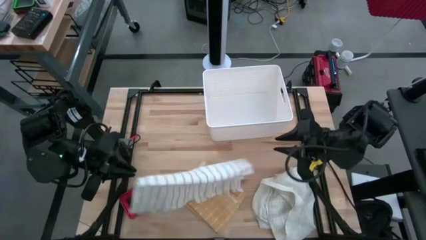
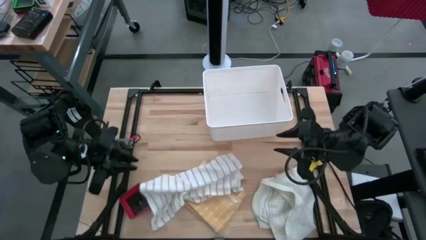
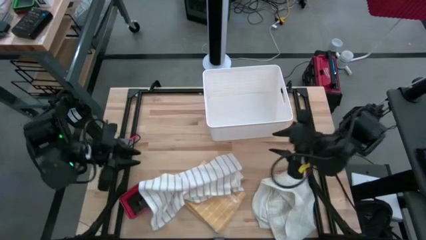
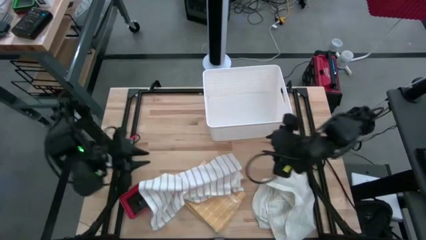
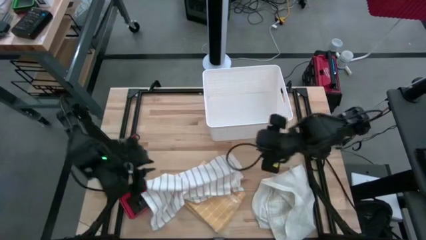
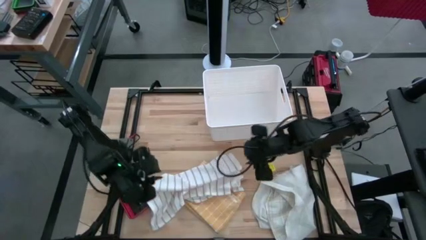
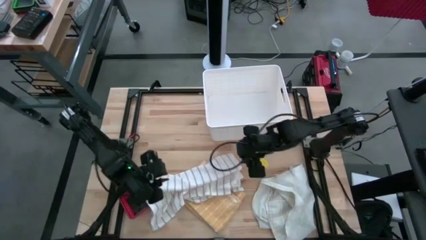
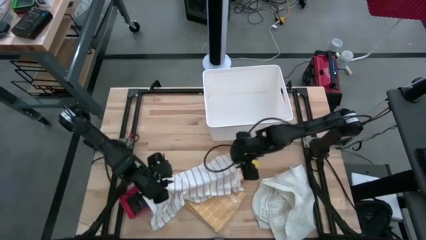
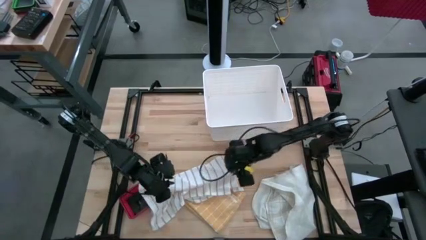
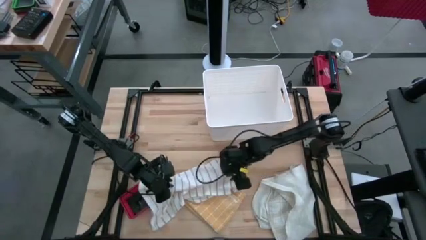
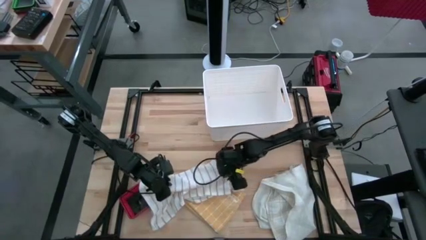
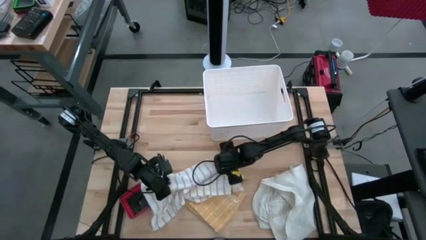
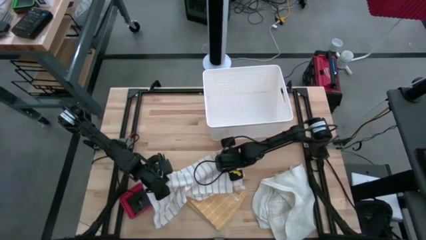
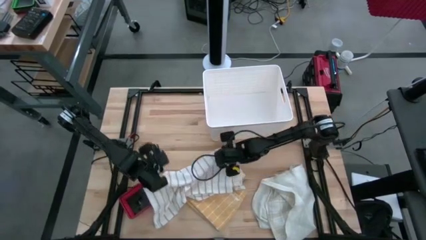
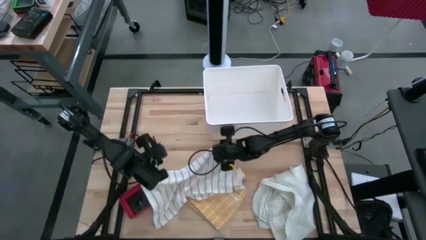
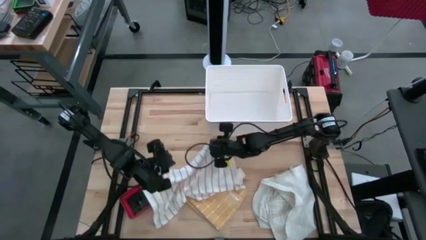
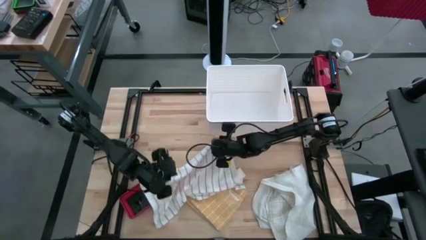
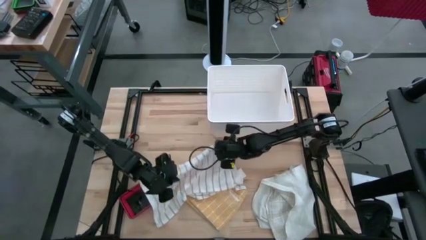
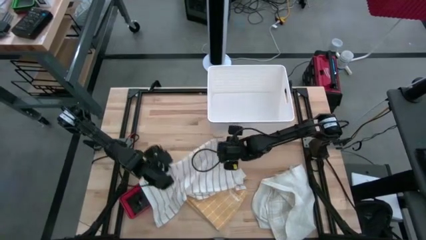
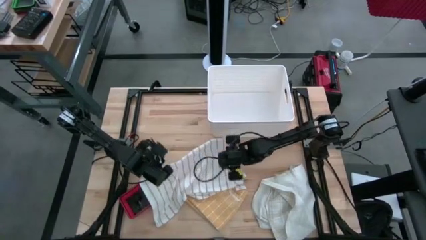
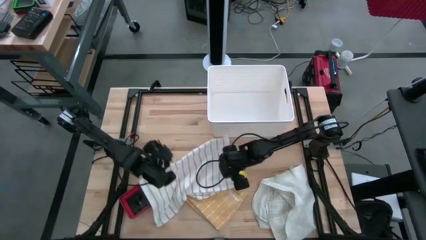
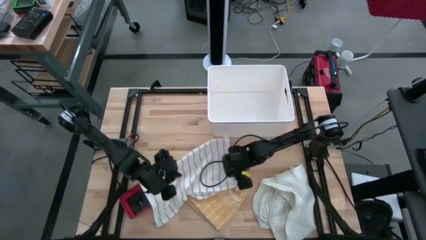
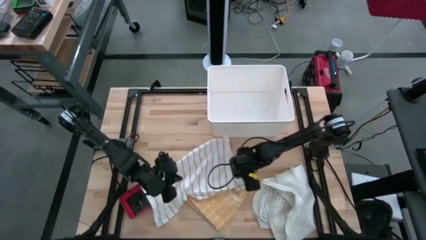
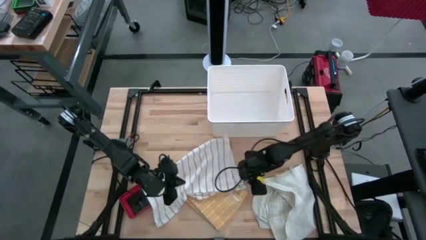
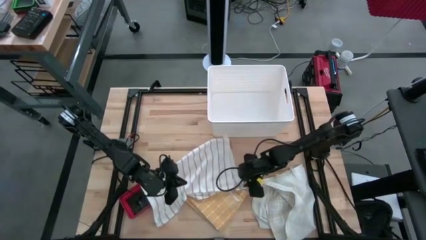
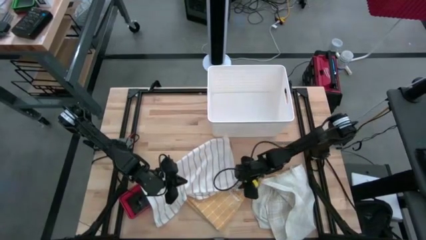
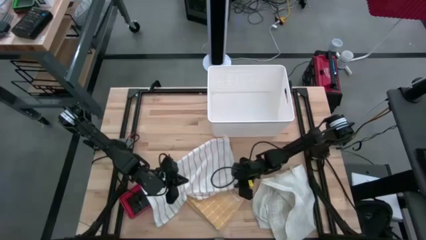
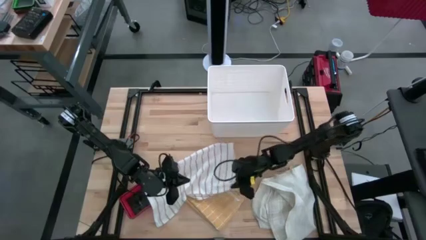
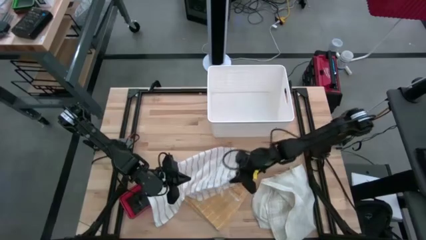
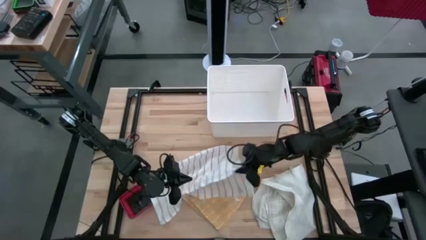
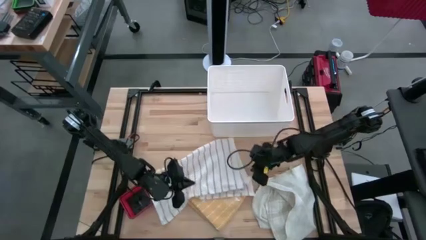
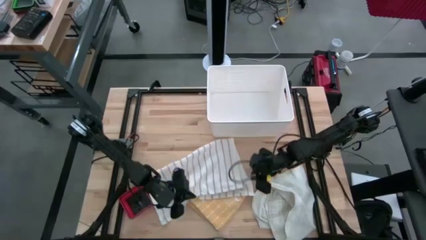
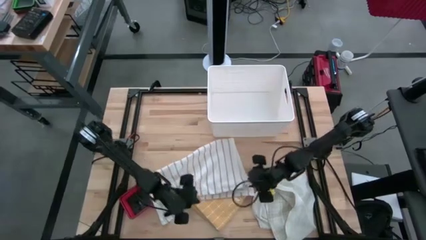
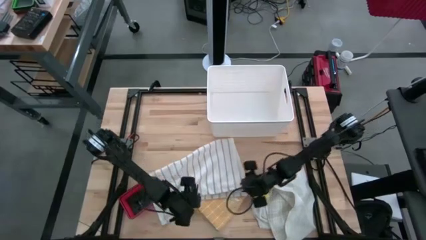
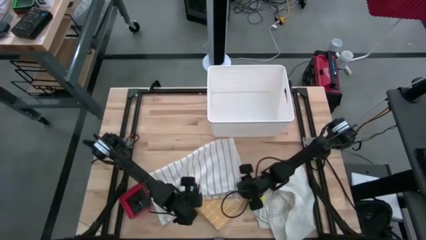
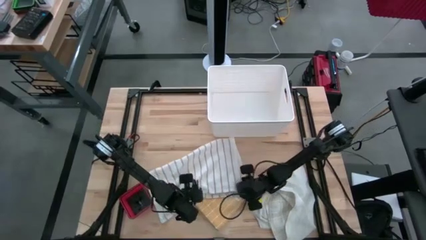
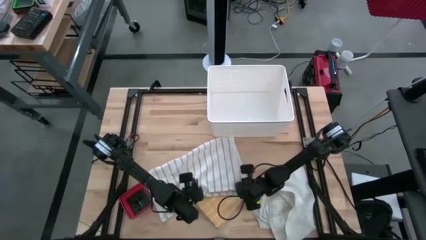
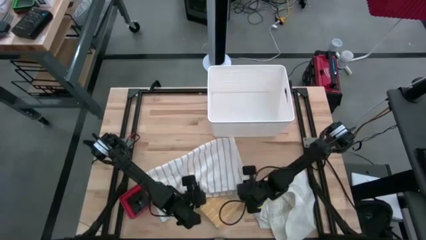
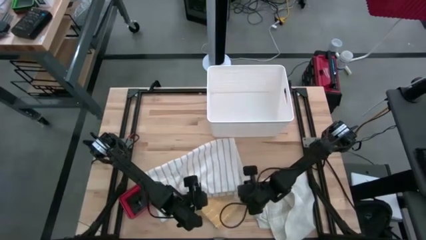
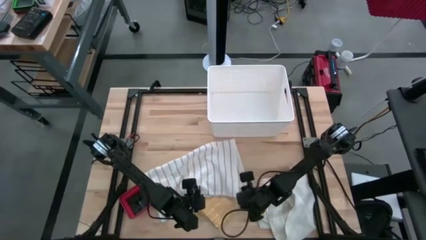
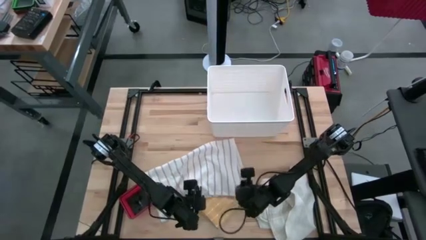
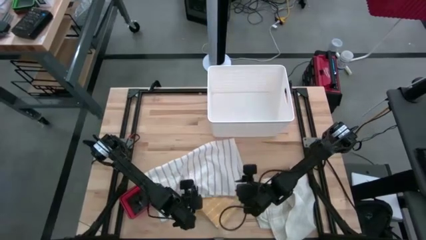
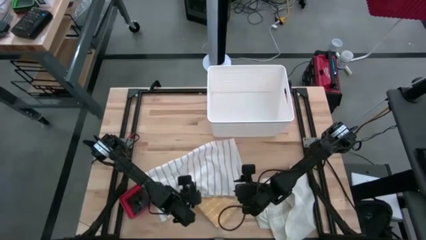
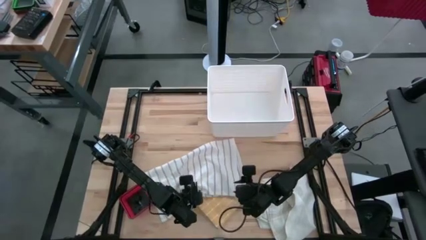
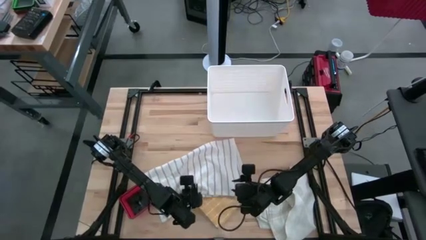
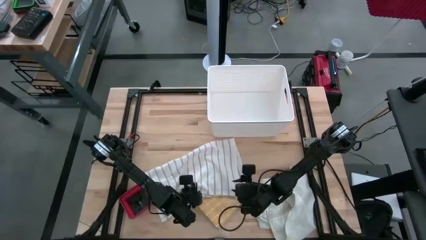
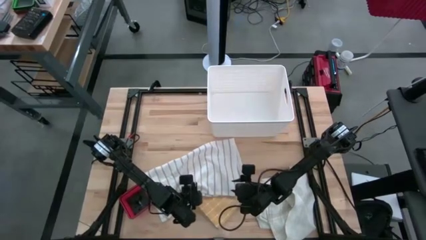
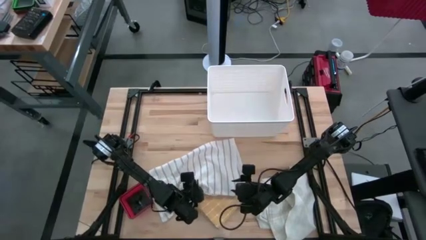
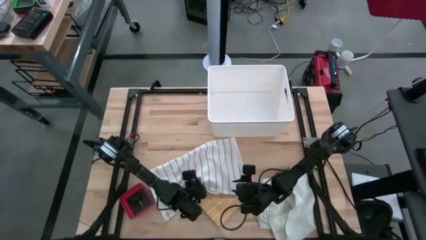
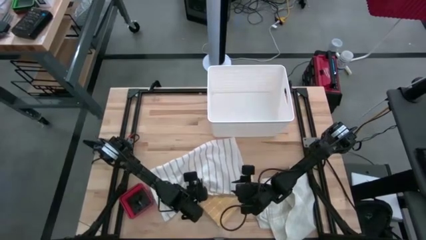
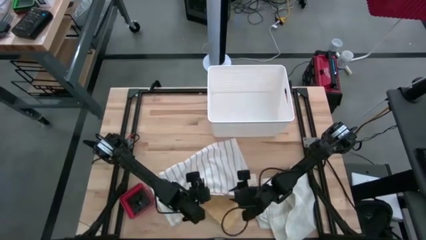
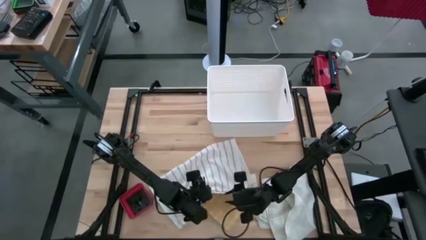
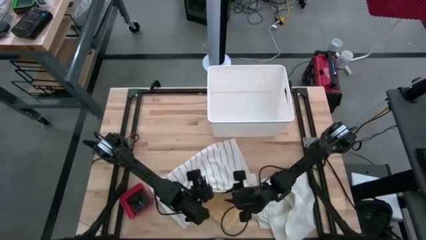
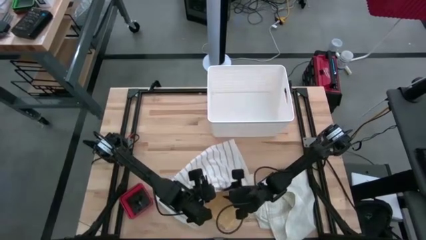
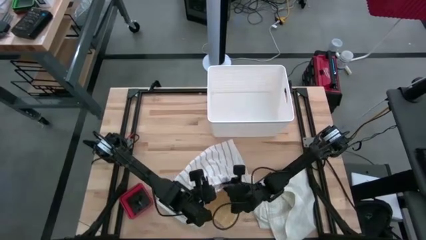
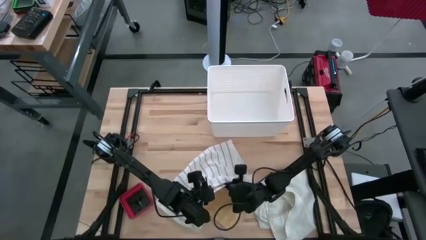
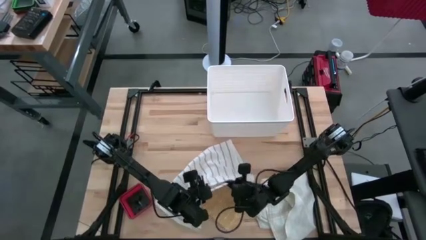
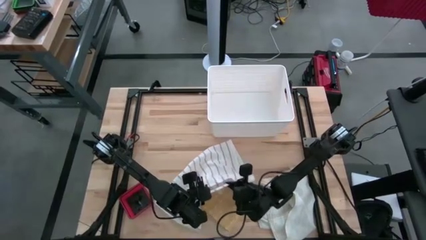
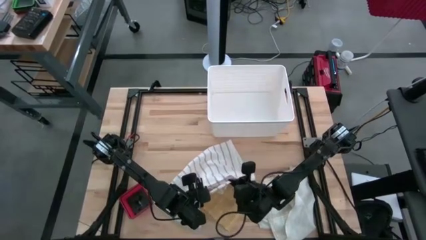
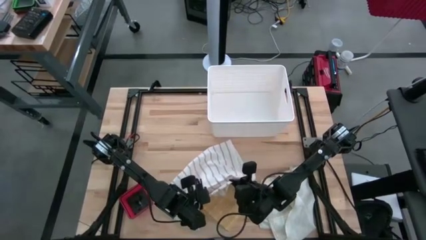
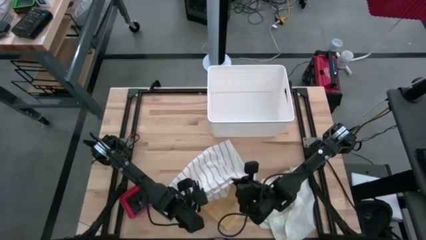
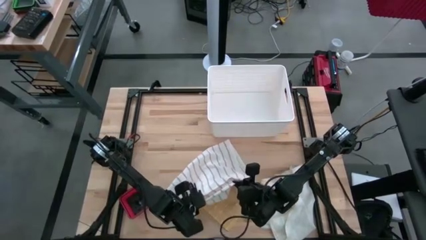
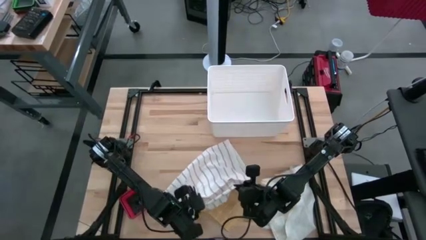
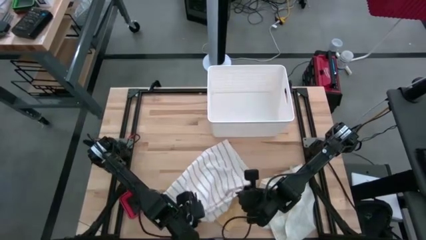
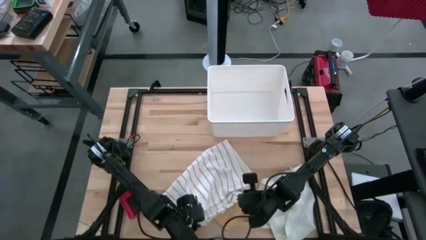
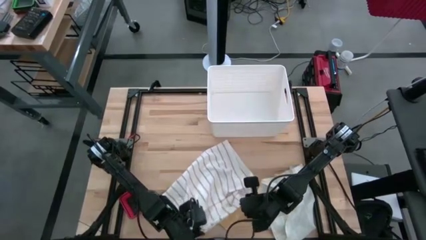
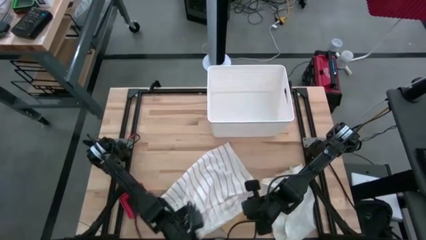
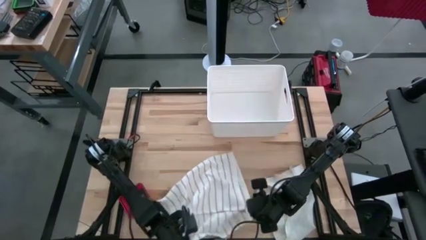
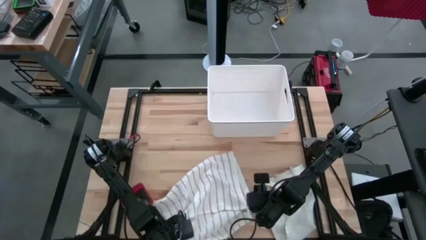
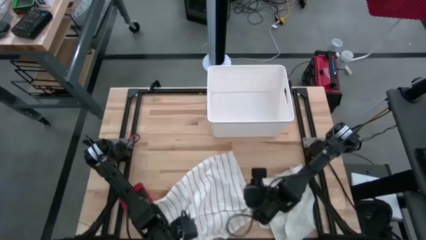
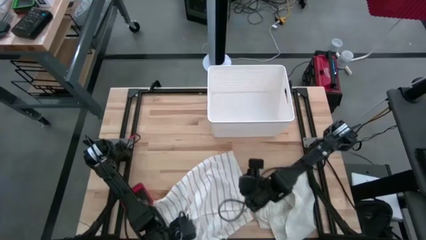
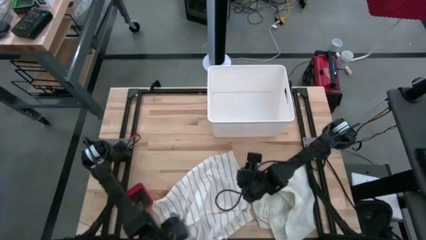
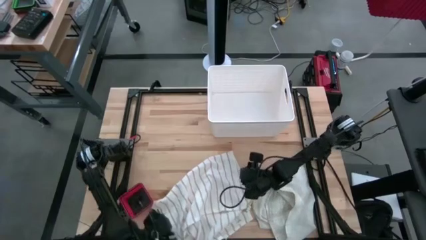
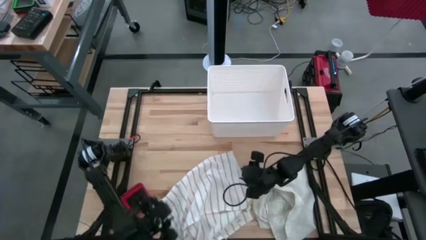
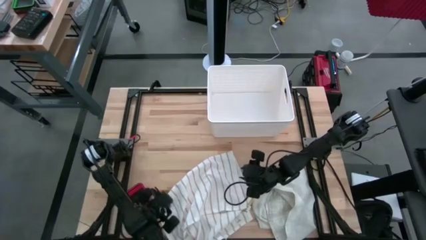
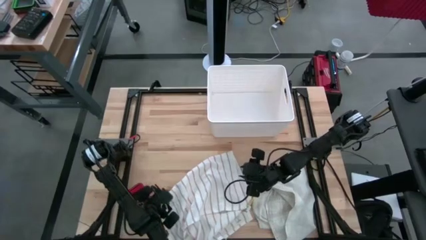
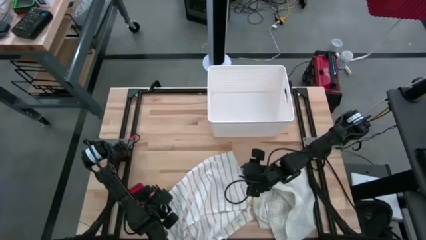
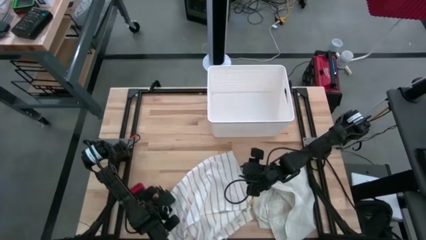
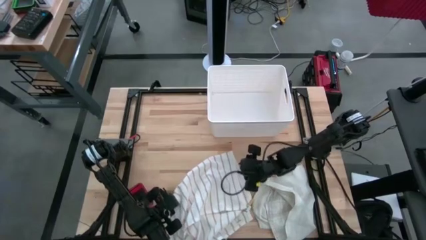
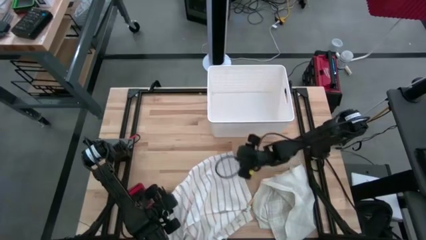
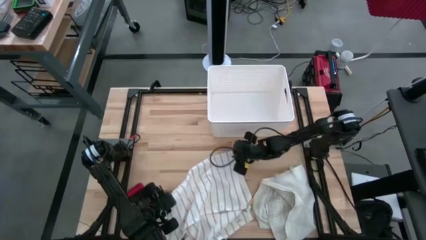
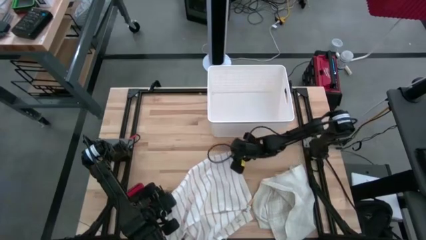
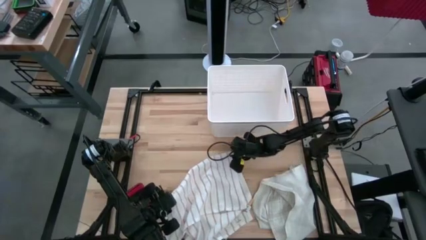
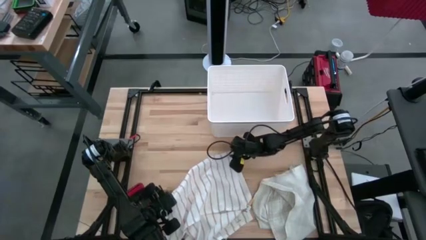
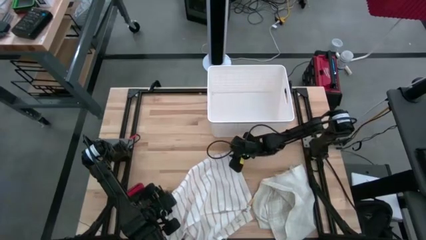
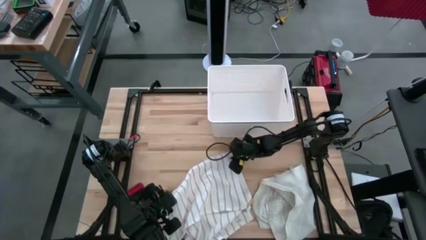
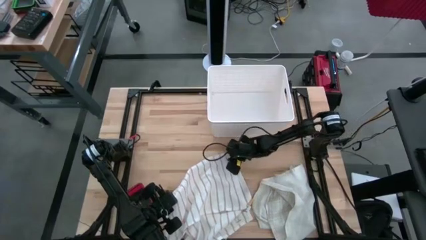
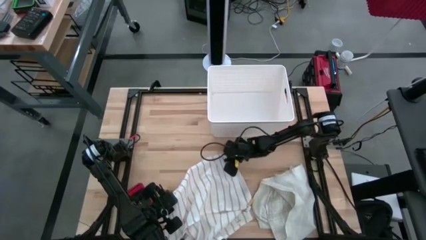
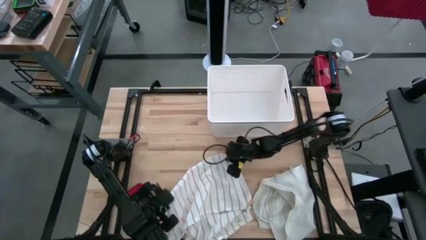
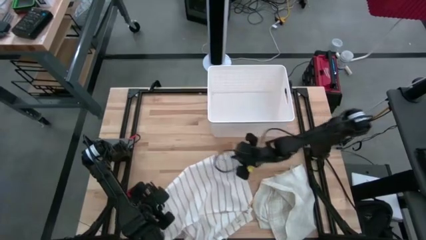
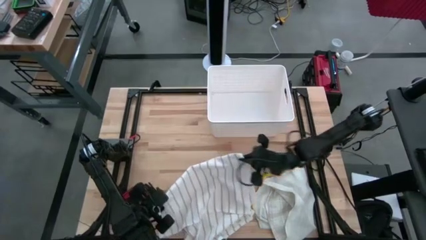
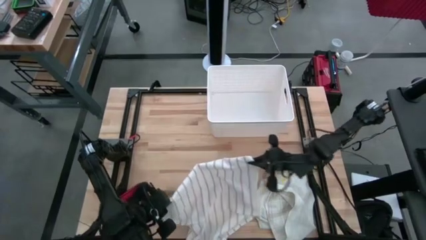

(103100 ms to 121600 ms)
Task: Fold towel
Fold the brown patterned towel
